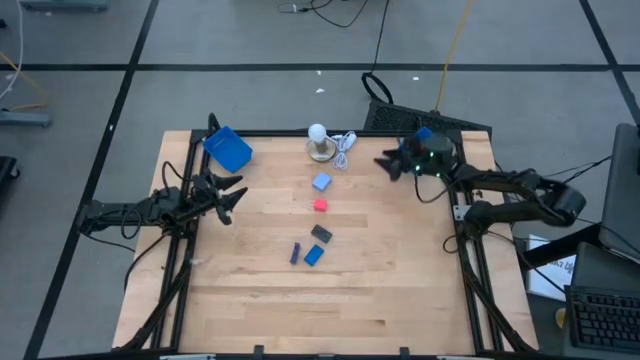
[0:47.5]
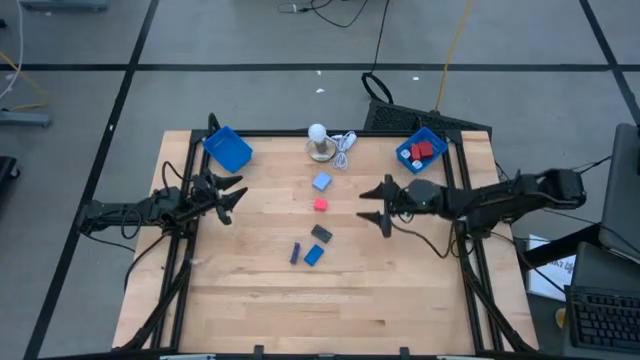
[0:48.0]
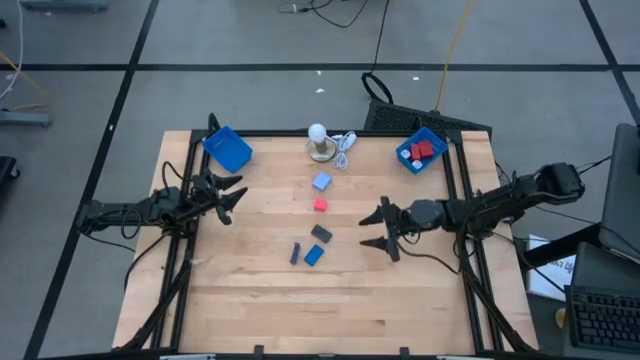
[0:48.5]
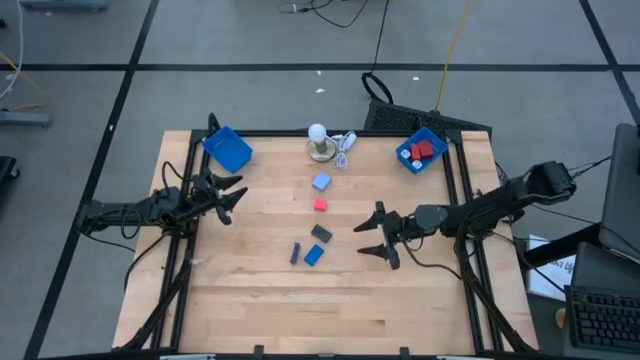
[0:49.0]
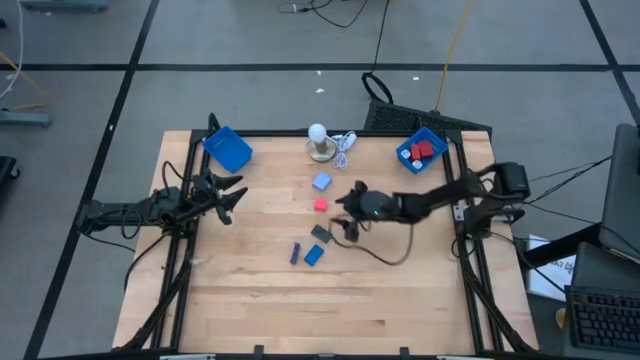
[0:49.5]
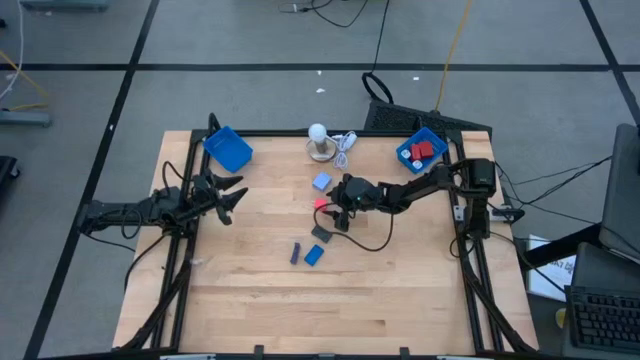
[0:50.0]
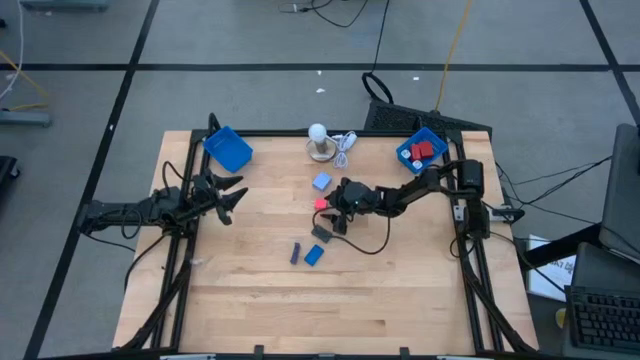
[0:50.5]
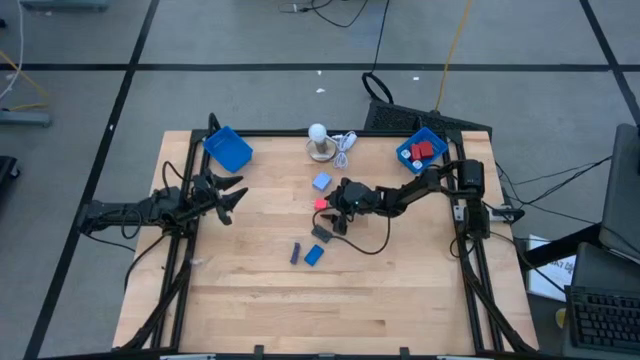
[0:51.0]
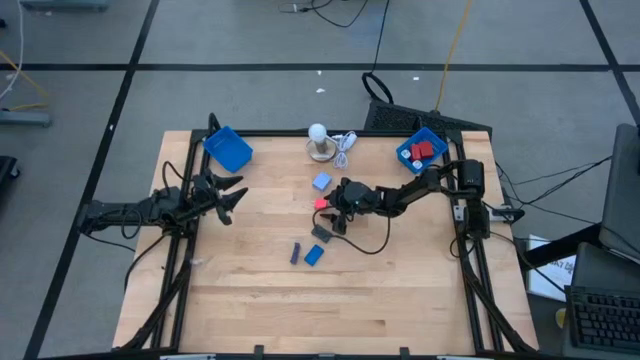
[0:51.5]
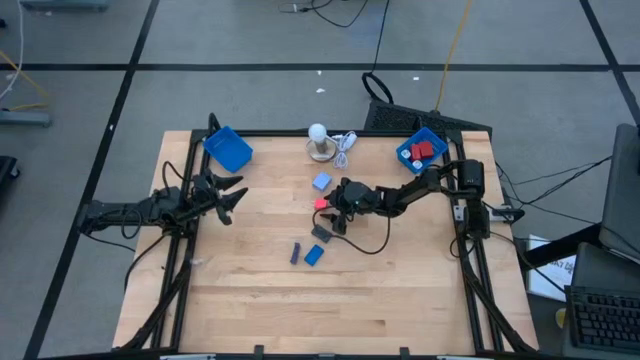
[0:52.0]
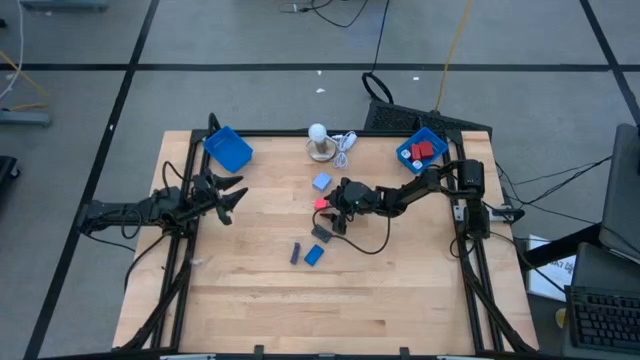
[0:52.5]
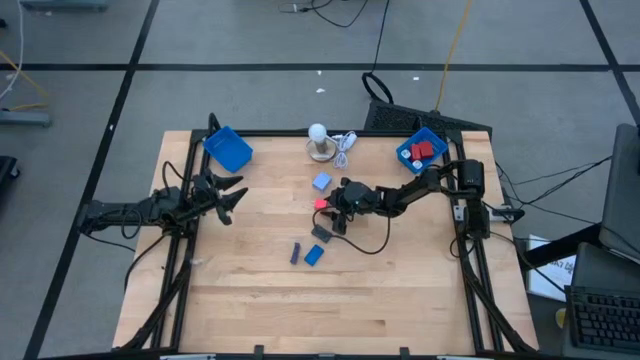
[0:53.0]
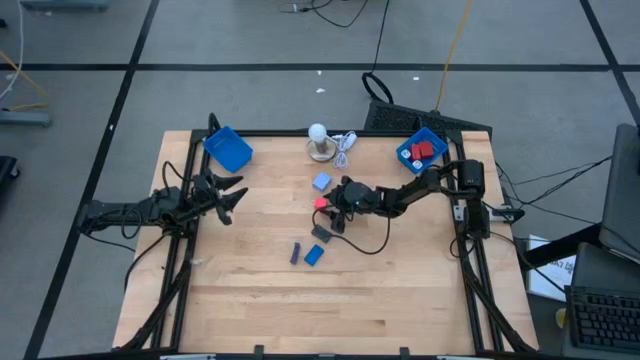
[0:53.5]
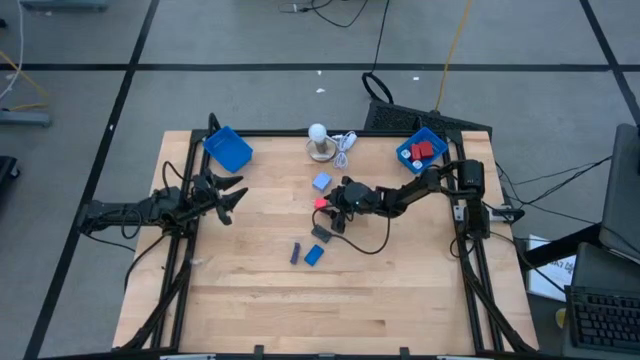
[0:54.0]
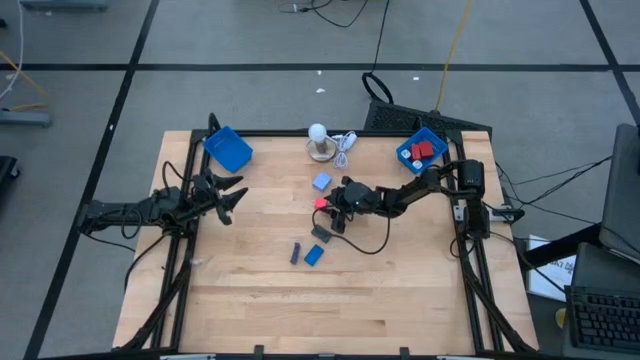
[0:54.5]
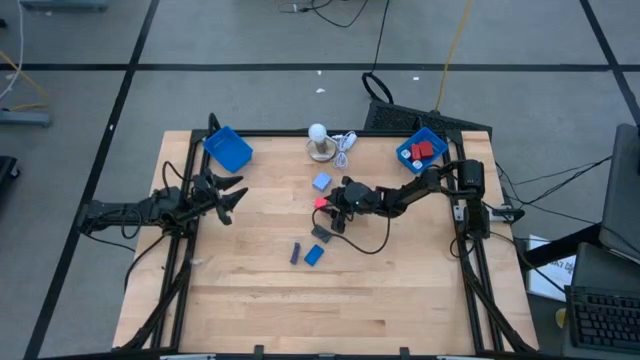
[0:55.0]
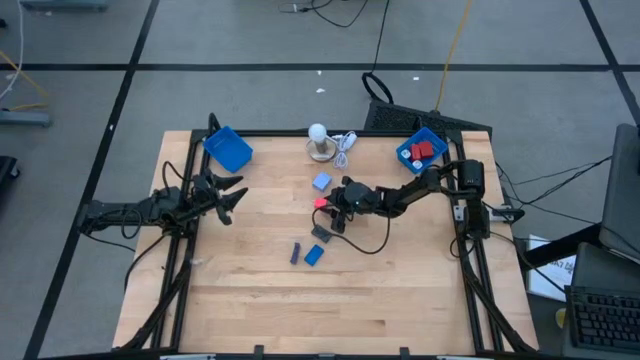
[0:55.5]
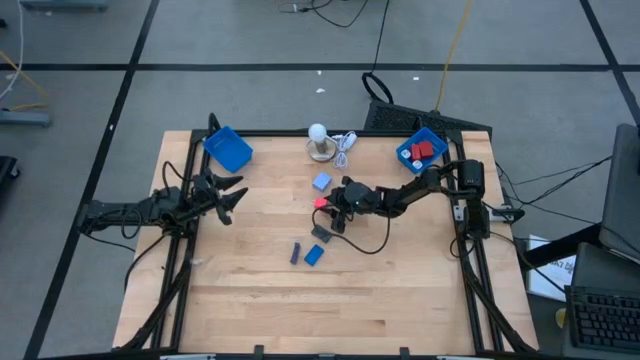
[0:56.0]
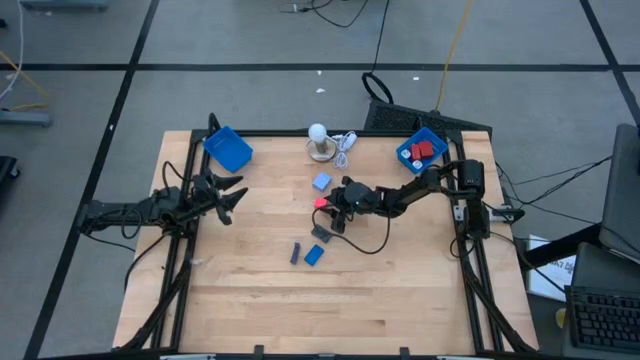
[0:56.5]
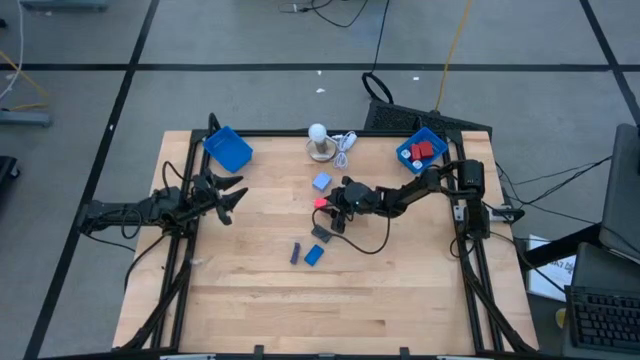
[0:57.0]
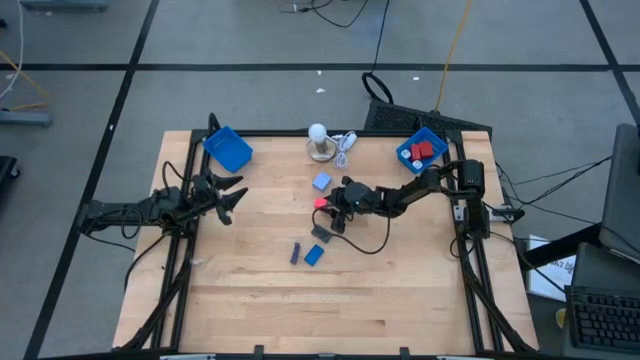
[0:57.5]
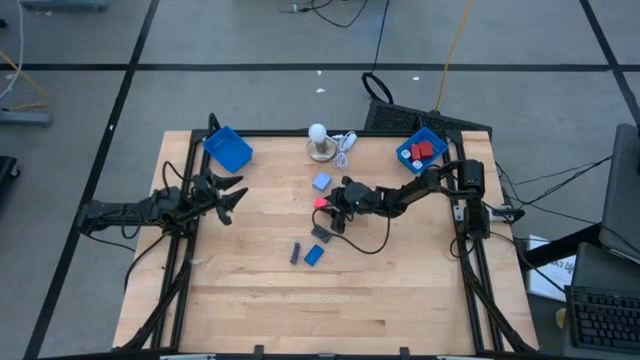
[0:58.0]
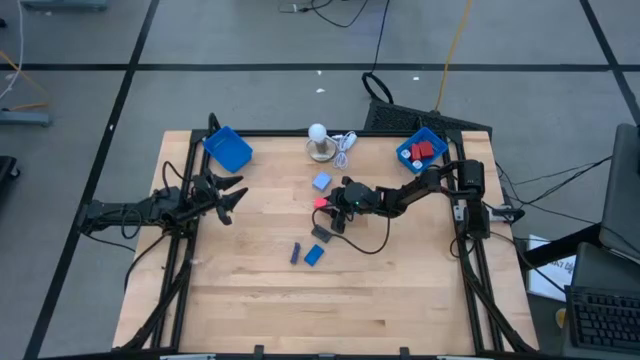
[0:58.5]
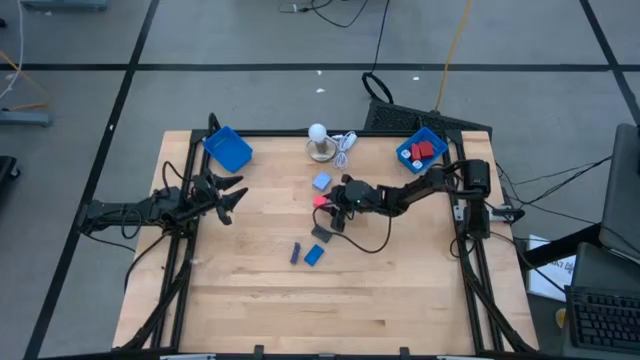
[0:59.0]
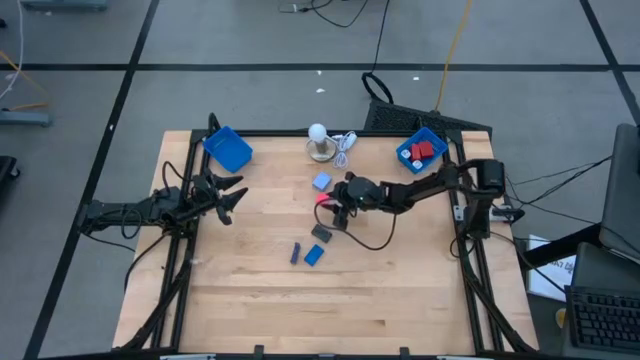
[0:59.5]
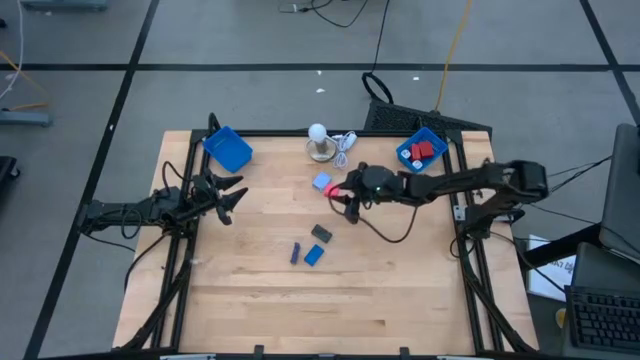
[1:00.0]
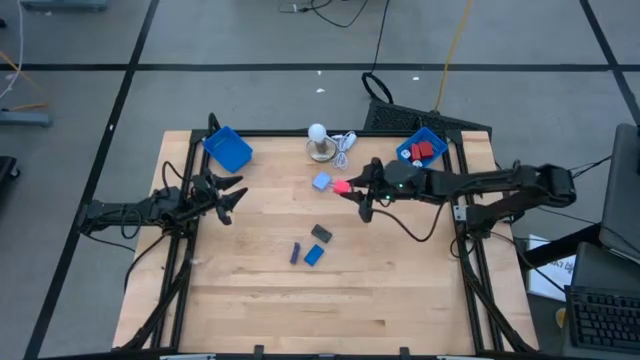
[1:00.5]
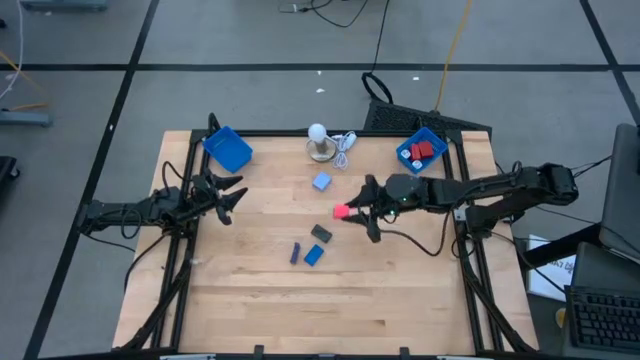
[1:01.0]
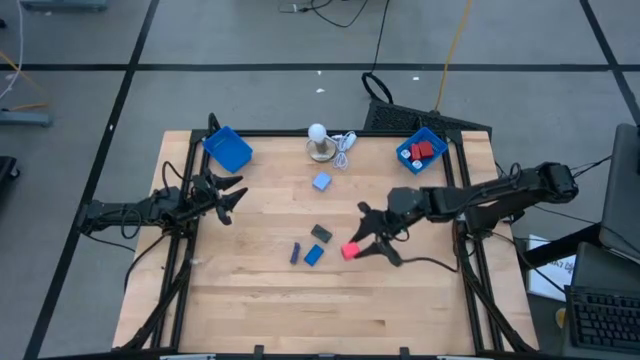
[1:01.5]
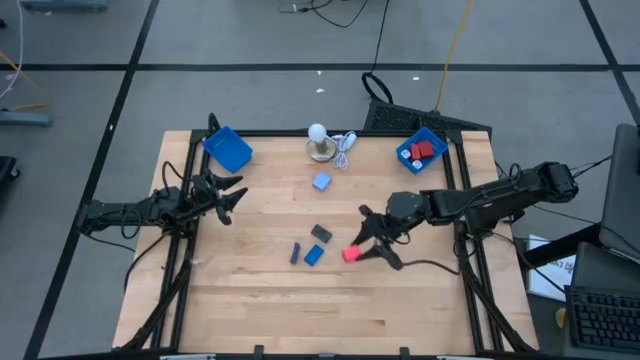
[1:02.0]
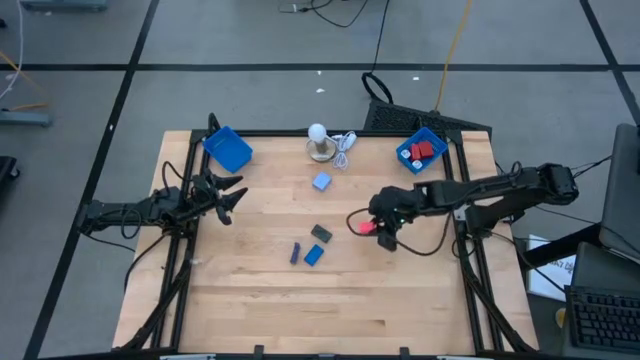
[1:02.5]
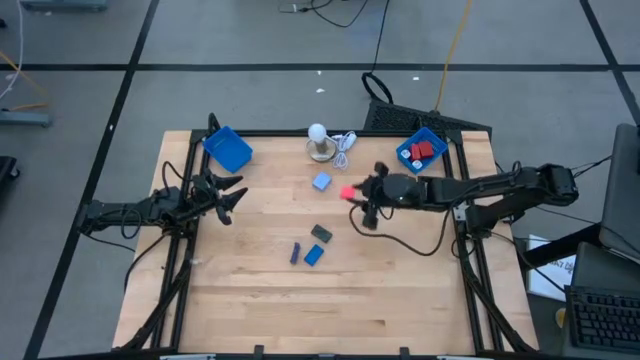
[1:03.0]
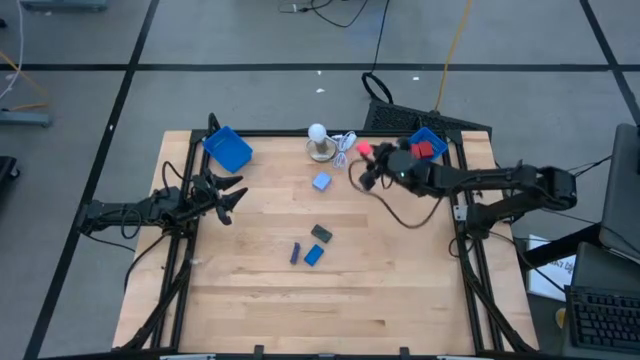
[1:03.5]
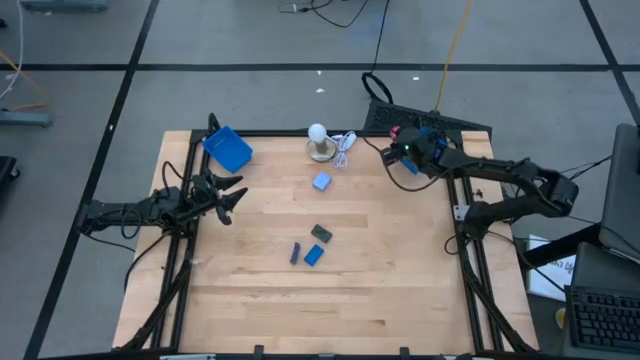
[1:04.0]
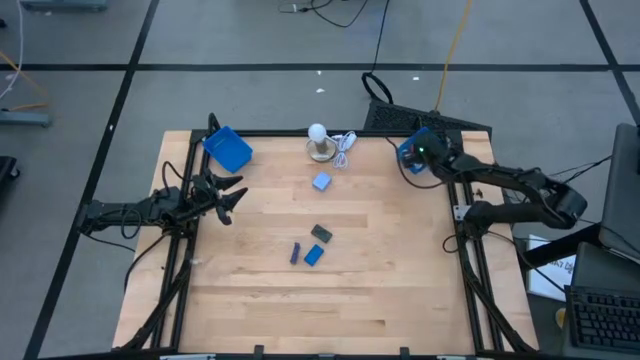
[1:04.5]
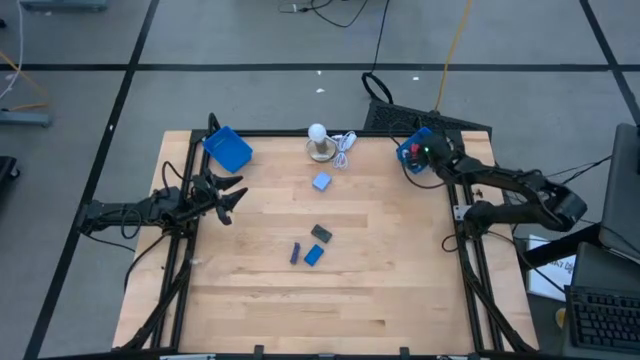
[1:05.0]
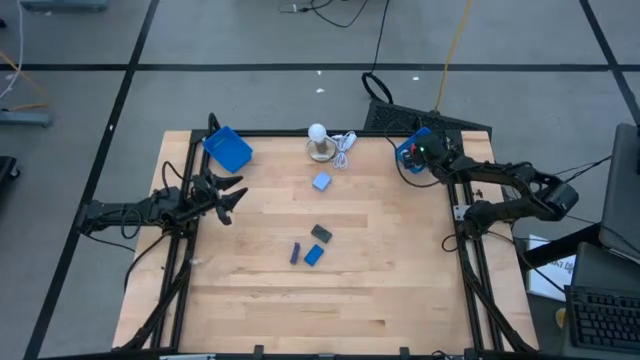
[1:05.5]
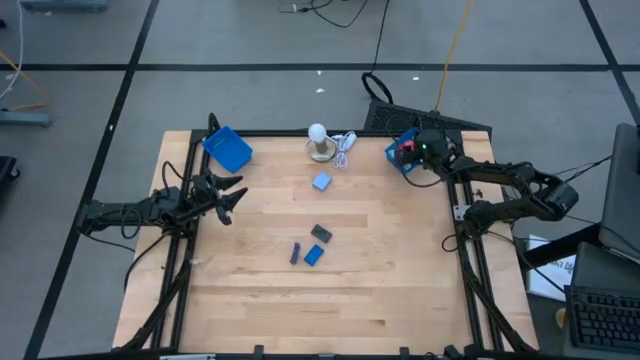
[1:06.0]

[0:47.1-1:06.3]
Task: Pick & Place Office items
Put the pink charger adapter into the right blue bin

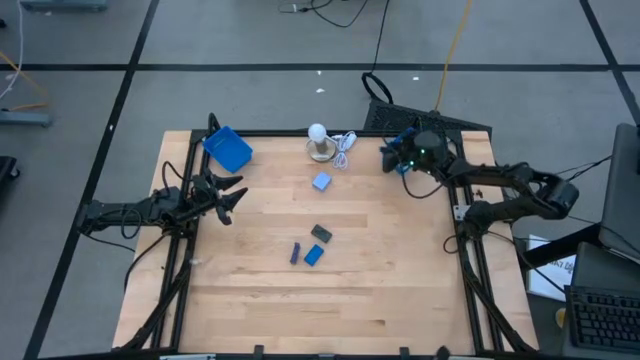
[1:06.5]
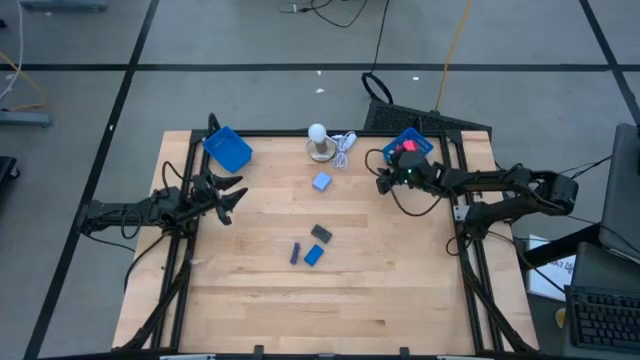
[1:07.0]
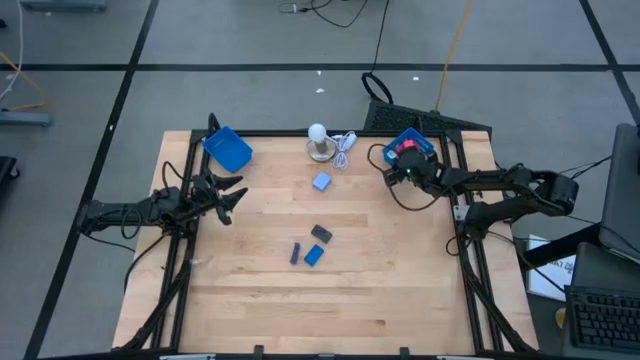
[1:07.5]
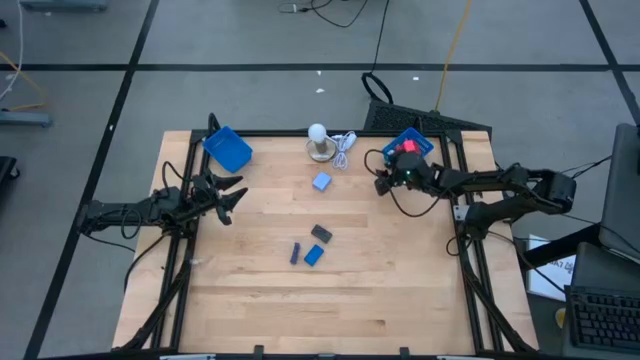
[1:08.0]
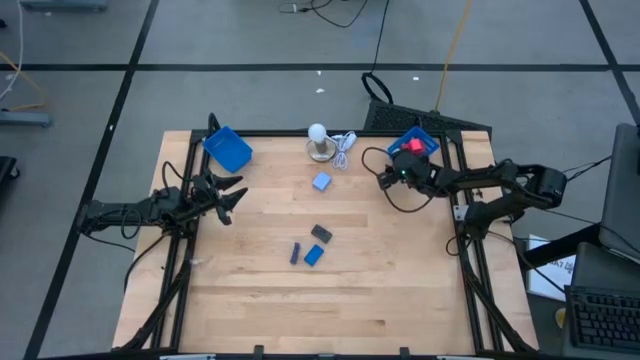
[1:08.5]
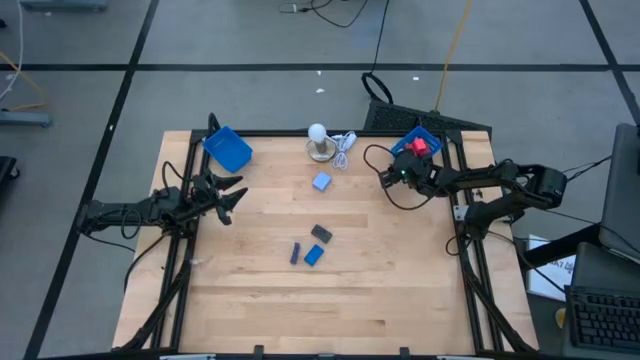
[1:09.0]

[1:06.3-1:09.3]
Adjust the right blue bin
